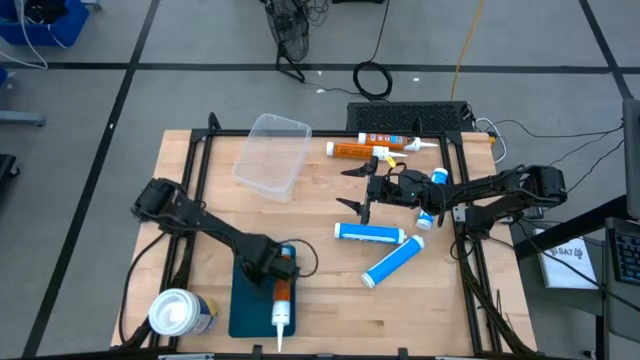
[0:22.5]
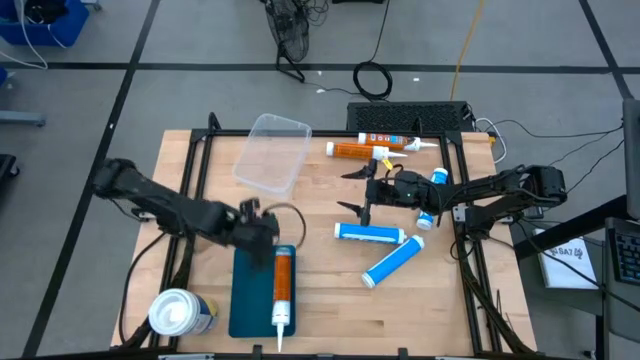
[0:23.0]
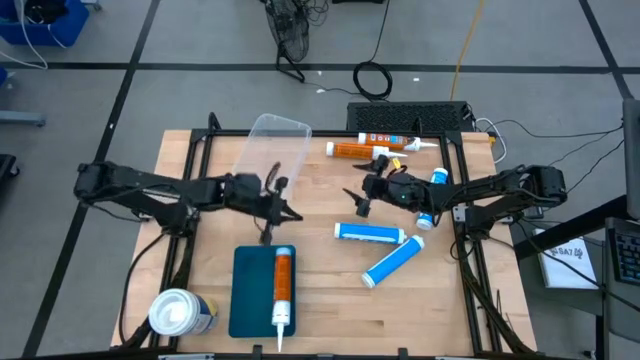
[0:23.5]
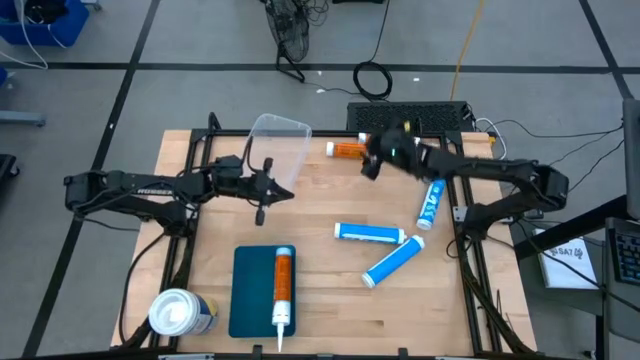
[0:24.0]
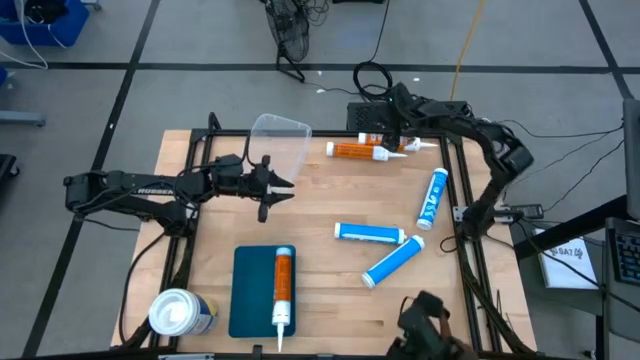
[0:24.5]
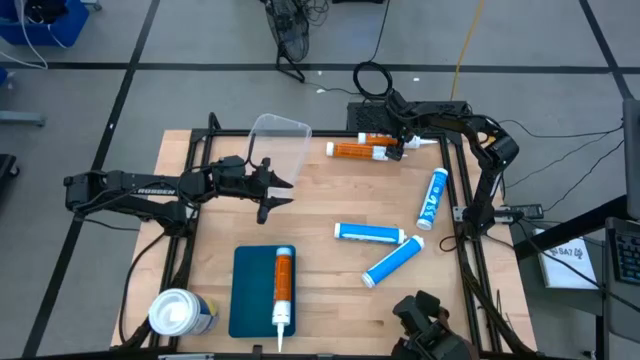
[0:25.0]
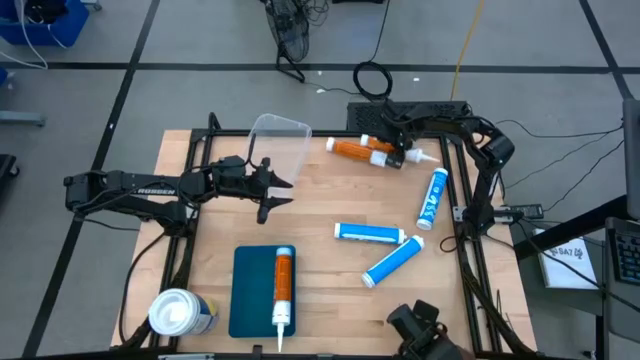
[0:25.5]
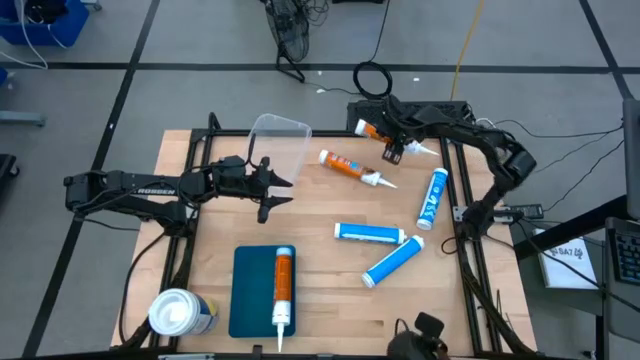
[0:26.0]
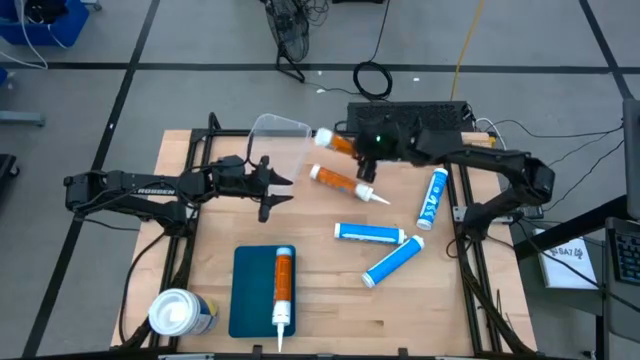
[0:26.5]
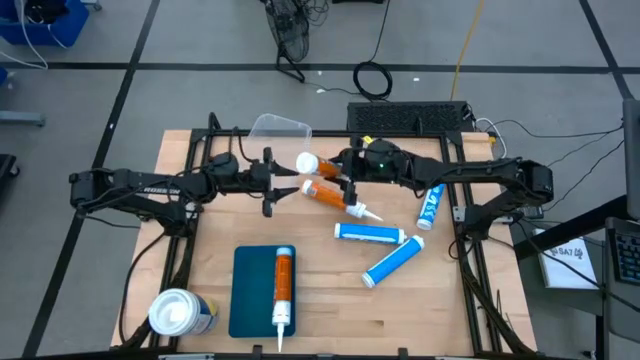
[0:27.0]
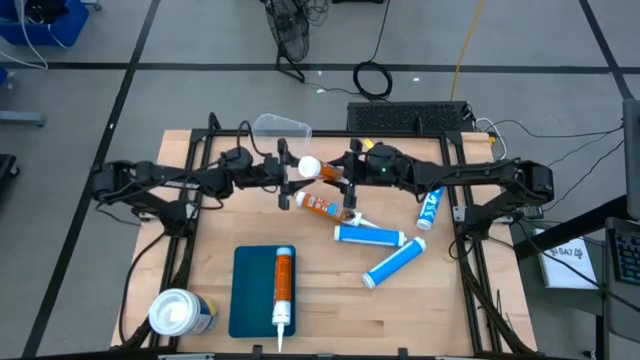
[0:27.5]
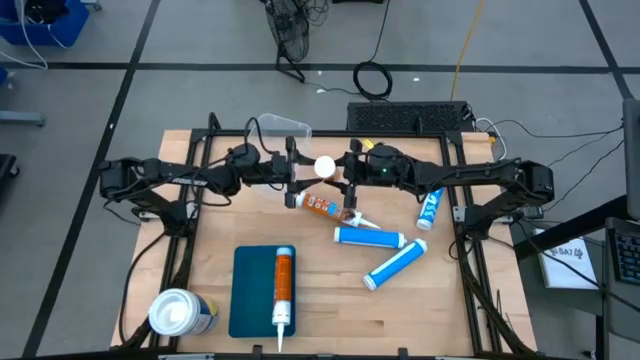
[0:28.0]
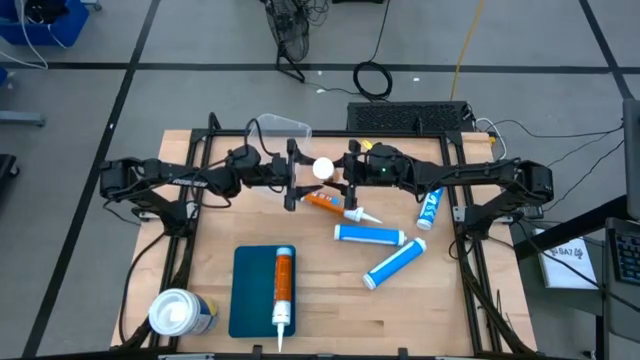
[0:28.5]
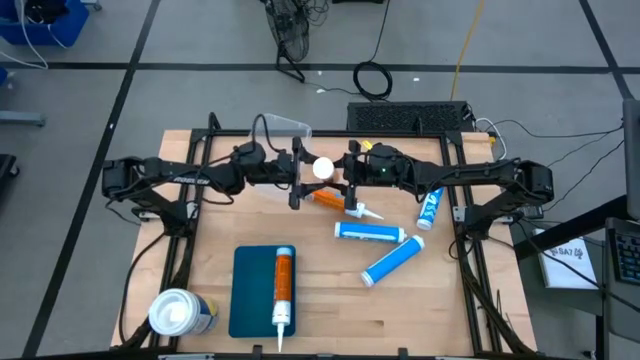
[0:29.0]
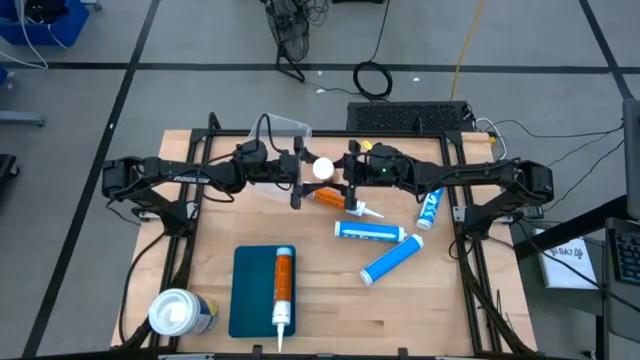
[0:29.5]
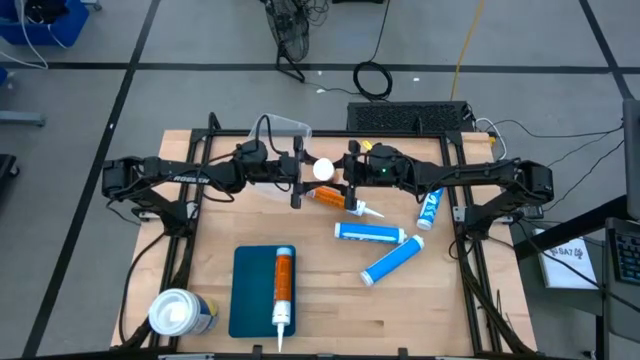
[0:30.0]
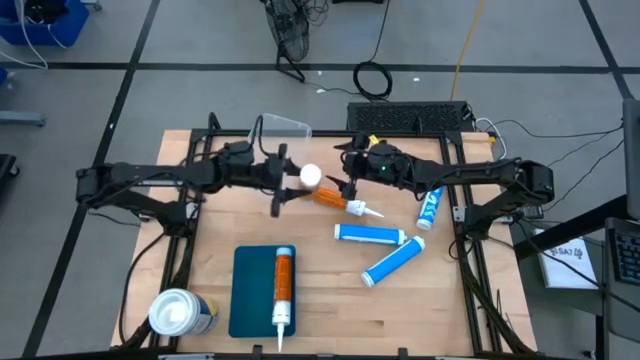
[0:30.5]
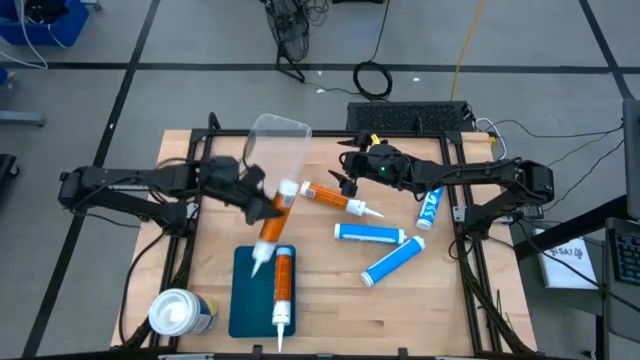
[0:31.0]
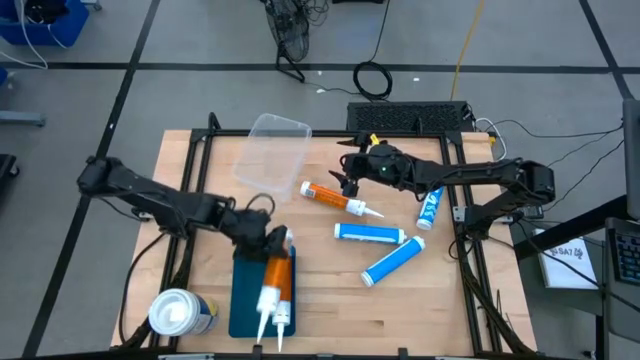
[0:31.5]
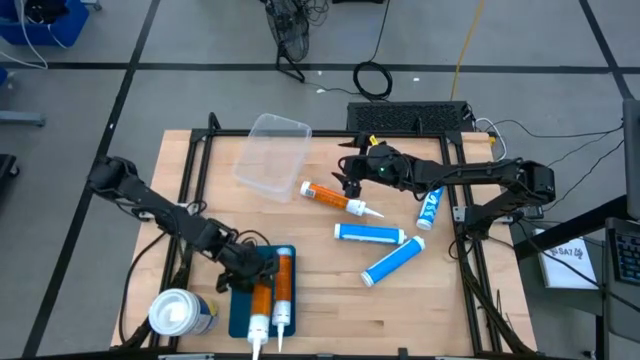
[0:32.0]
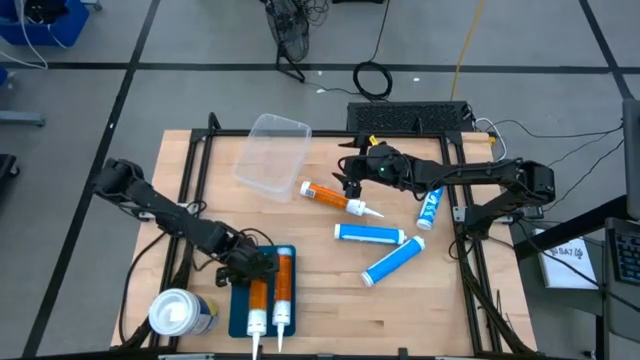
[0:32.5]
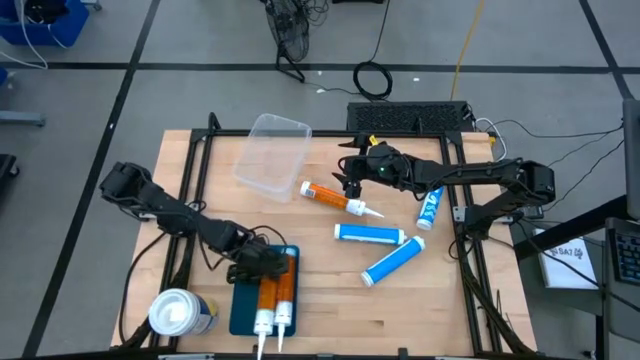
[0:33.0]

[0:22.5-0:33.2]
Task: Pick & place silicon tubes, Sealant and Lysol wipes
Put the top orange sealant into the blue bin

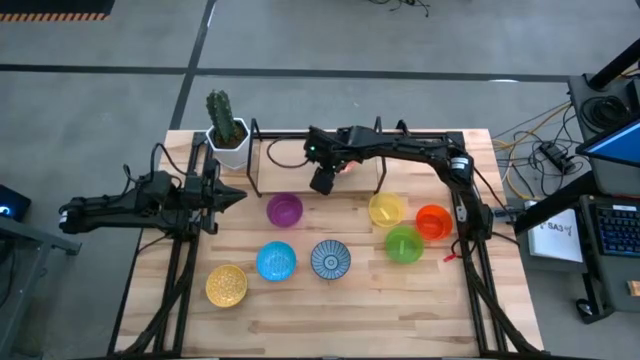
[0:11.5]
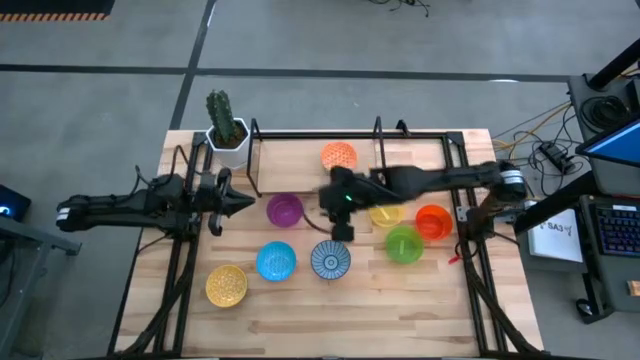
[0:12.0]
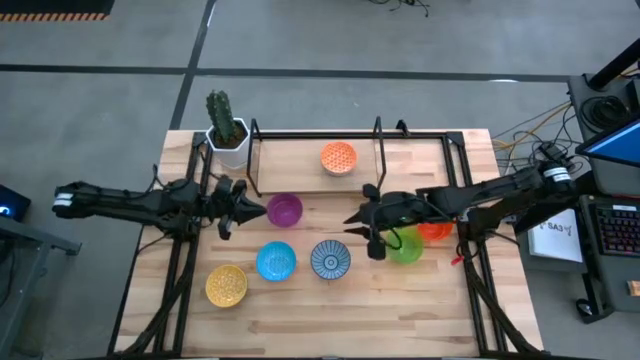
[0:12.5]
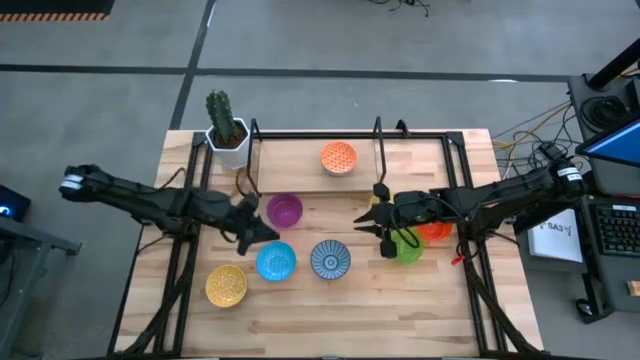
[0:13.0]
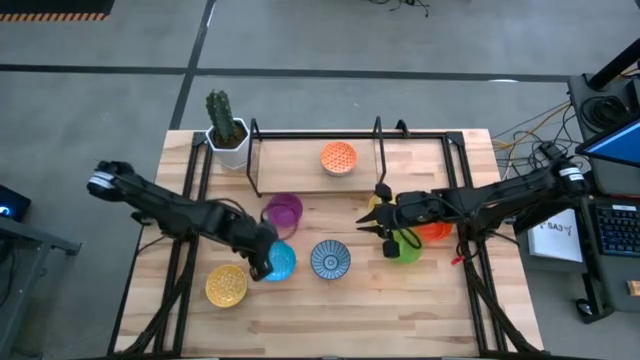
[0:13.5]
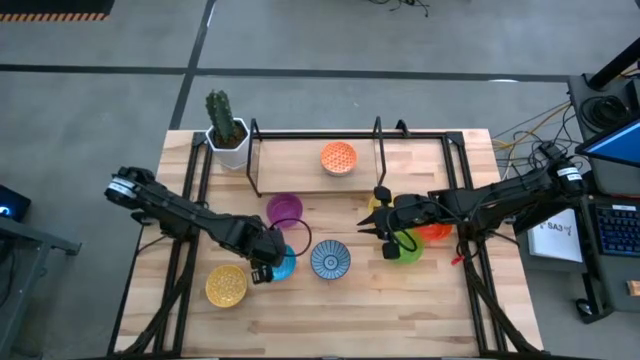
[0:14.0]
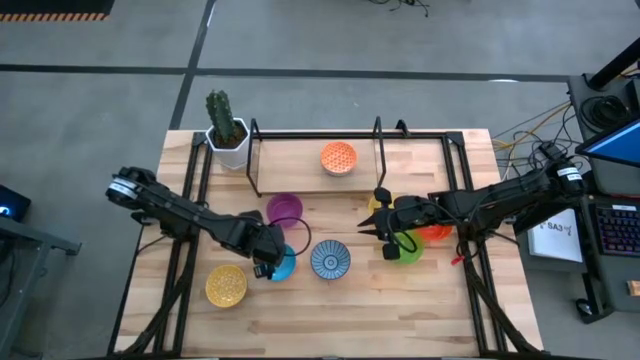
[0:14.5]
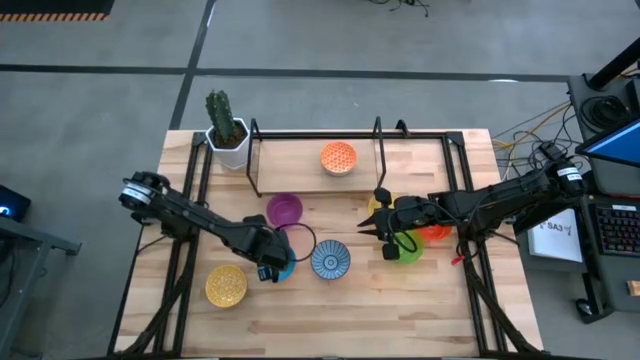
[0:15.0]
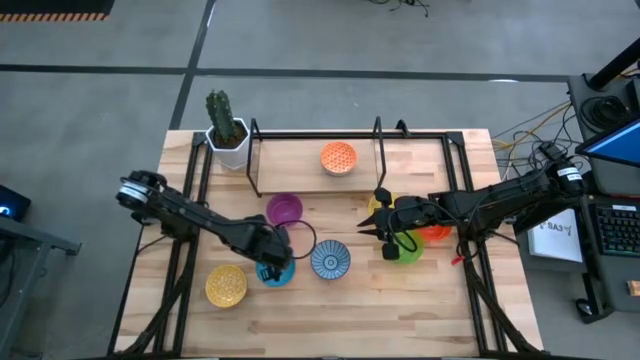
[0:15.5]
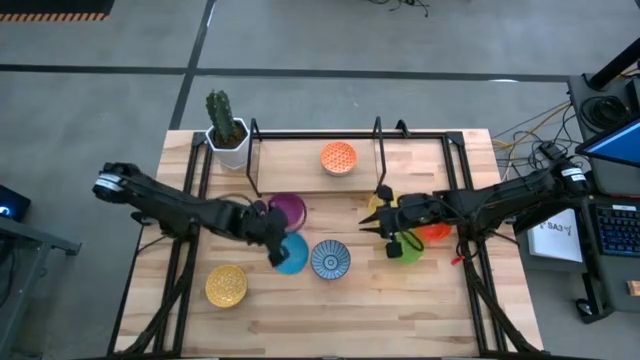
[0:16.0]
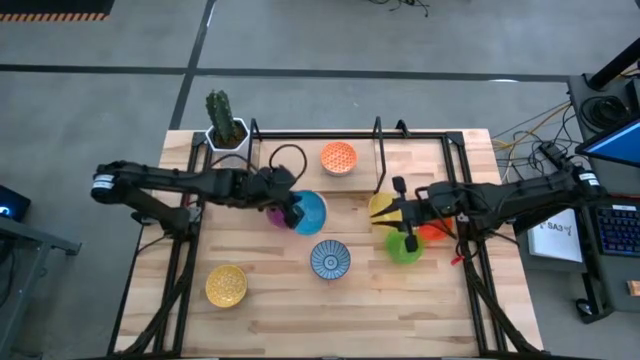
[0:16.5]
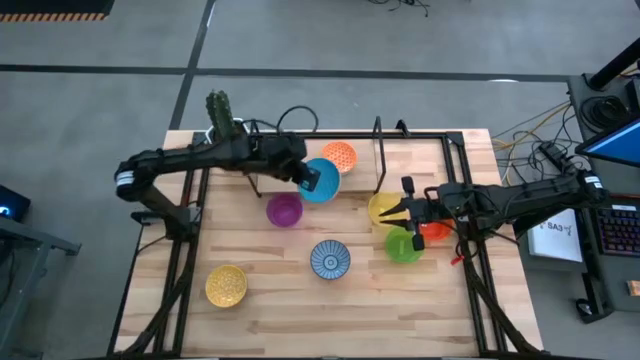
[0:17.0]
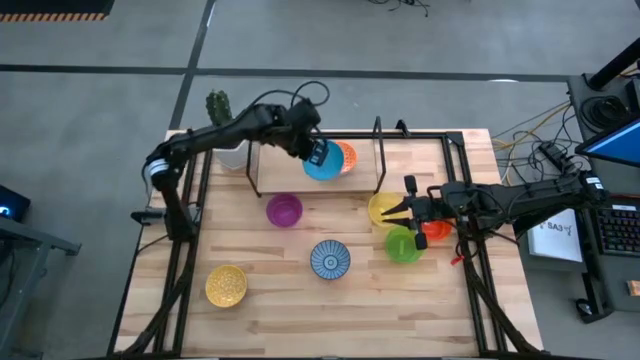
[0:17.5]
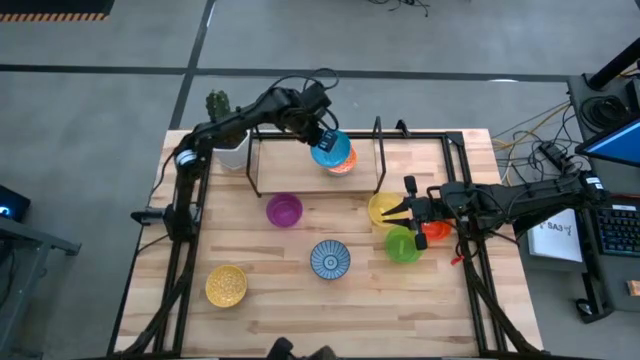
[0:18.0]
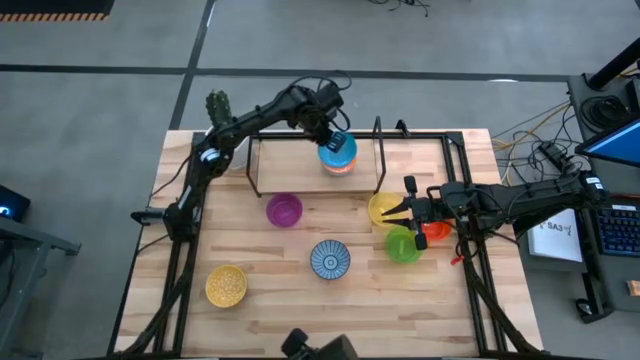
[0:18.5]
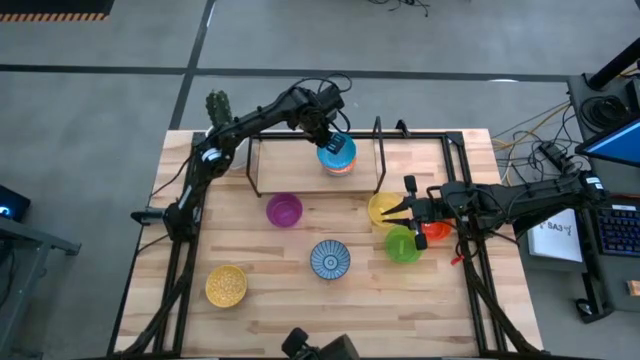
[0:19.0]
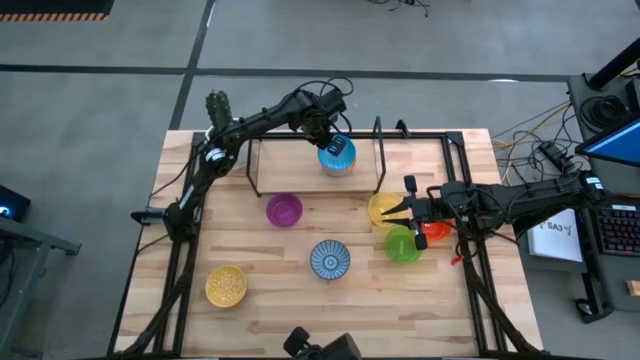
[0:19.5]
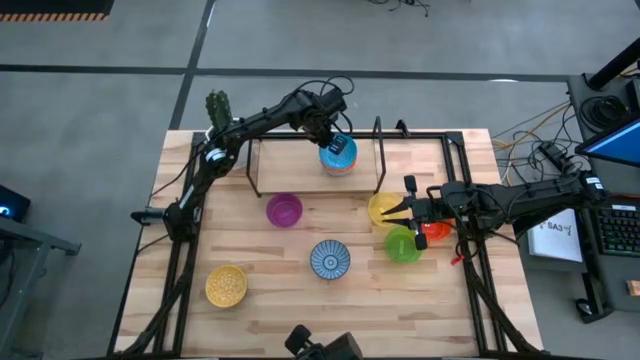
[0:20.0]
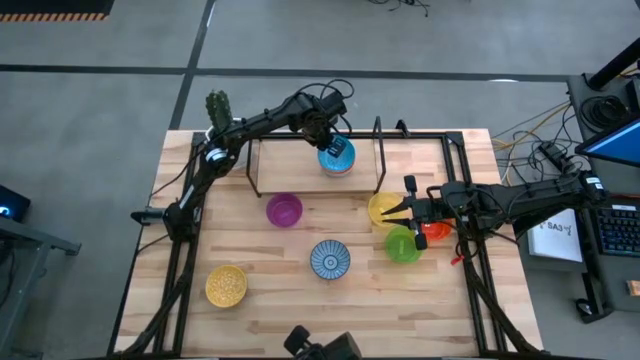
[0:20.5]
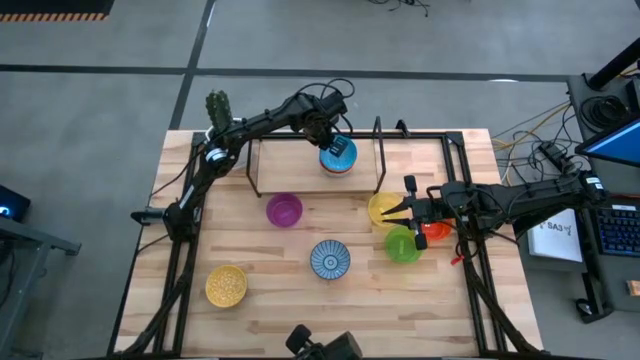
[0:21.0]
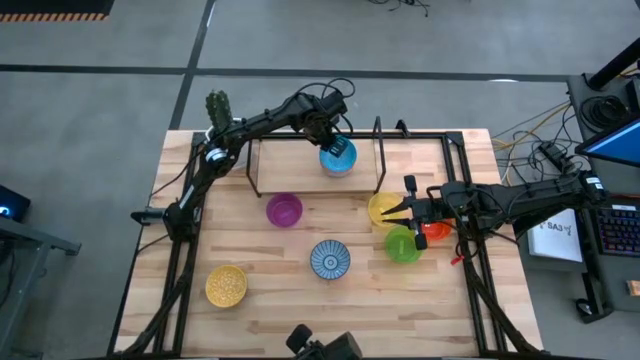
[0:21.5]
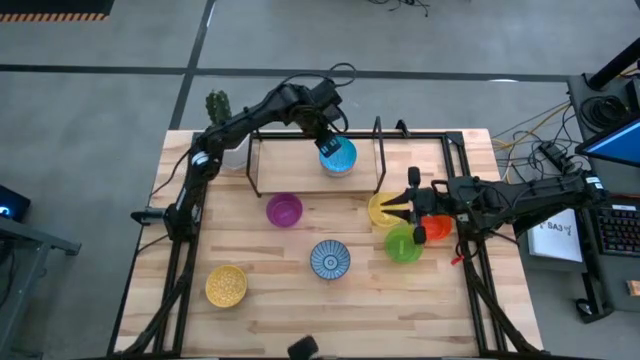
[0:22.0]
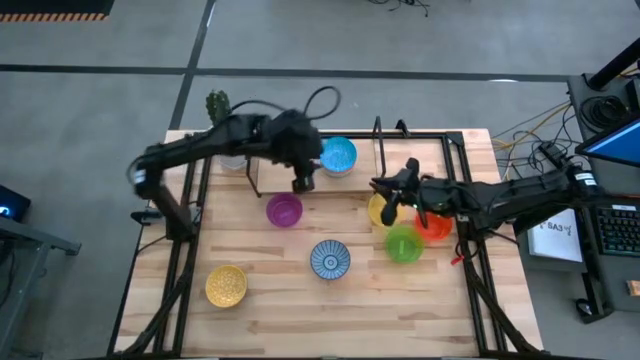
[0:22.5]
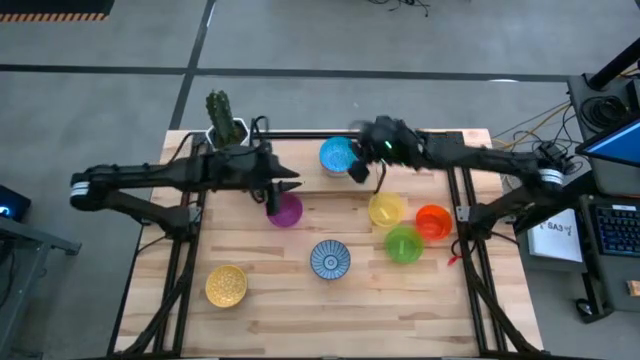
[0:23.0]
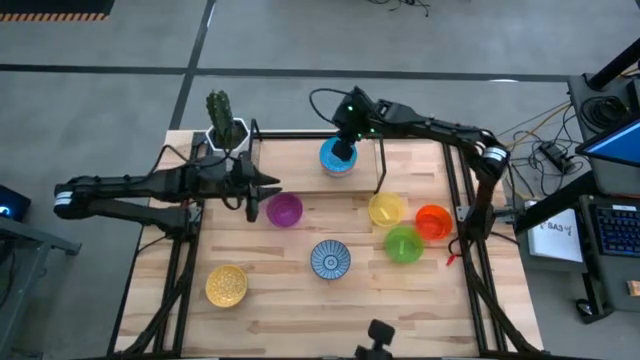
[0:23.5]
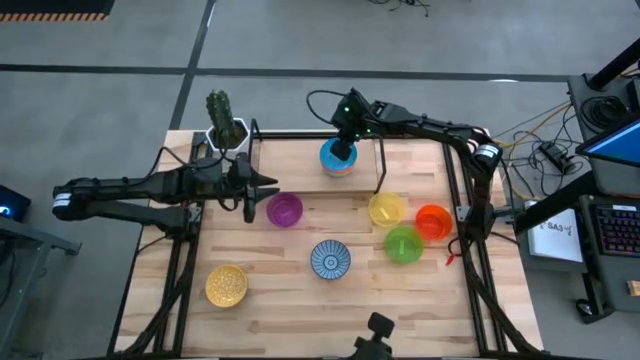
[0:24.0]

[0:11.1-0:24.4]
Task: Place and stack bowls onto a shelf
Stack the orange-blue patterned bowl on top of the blue-orange patterned bowl on the shelf
